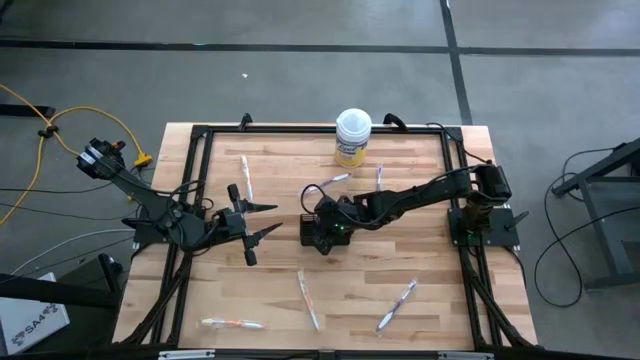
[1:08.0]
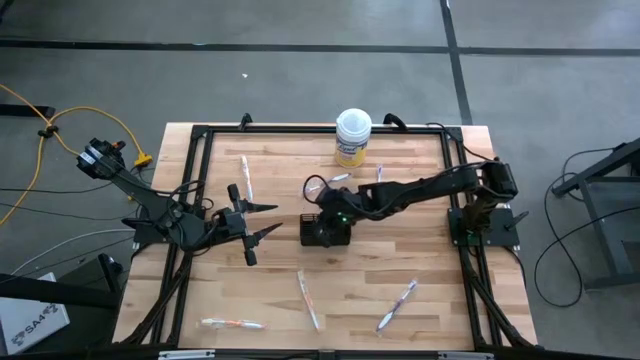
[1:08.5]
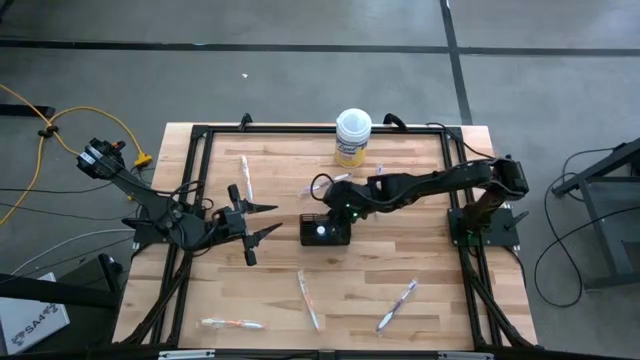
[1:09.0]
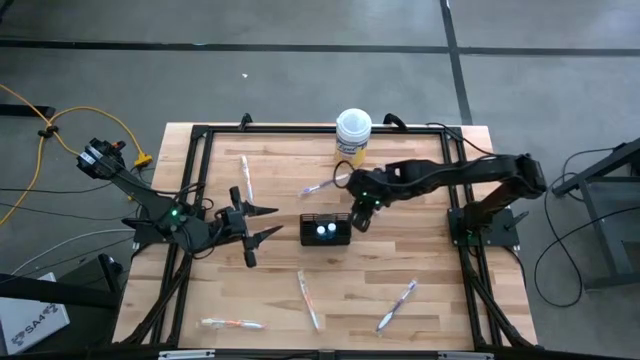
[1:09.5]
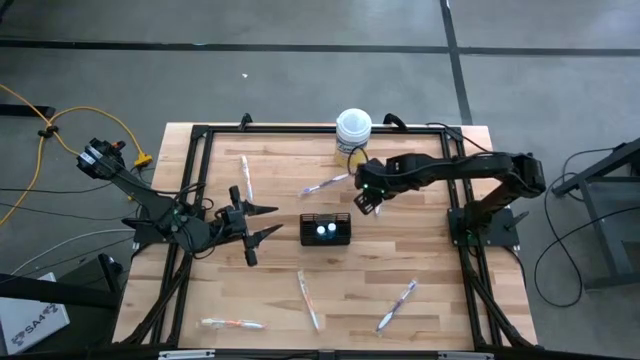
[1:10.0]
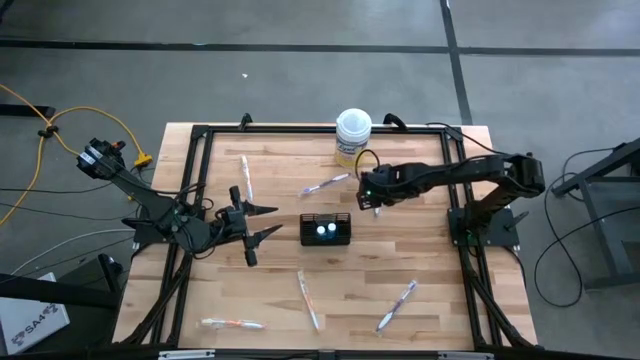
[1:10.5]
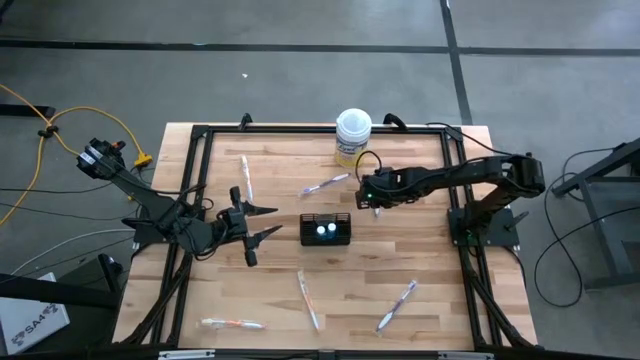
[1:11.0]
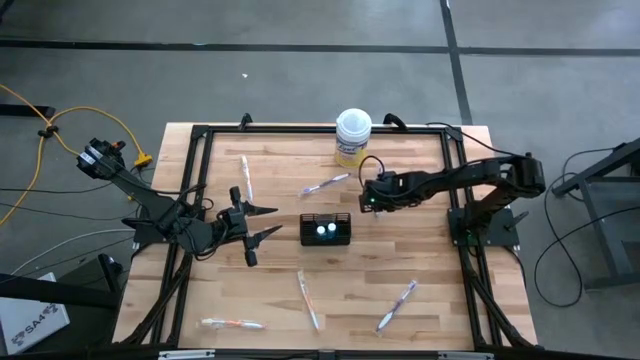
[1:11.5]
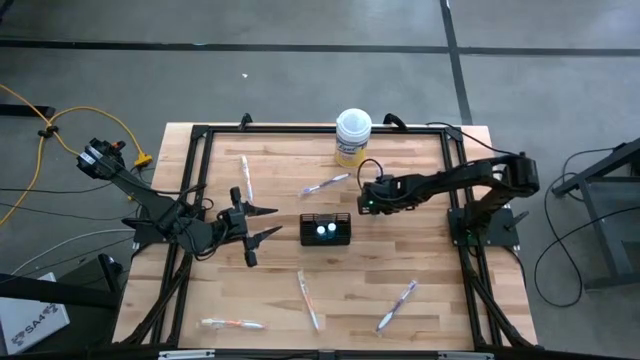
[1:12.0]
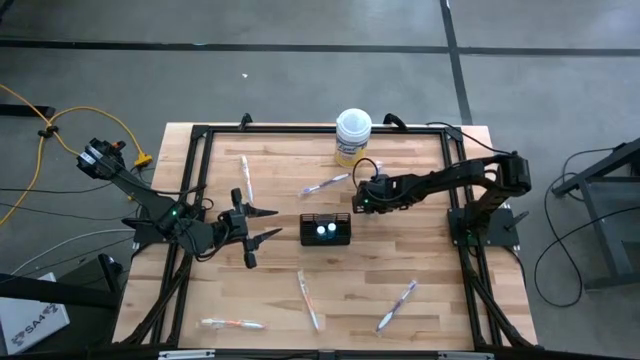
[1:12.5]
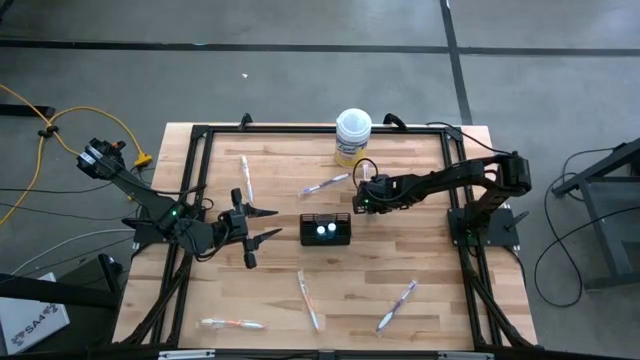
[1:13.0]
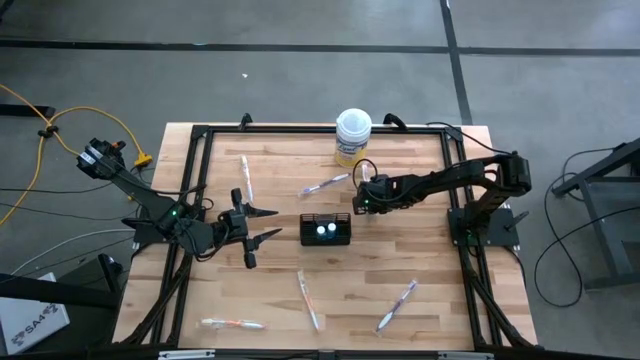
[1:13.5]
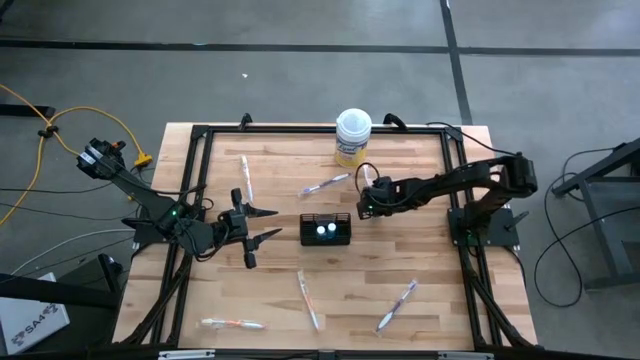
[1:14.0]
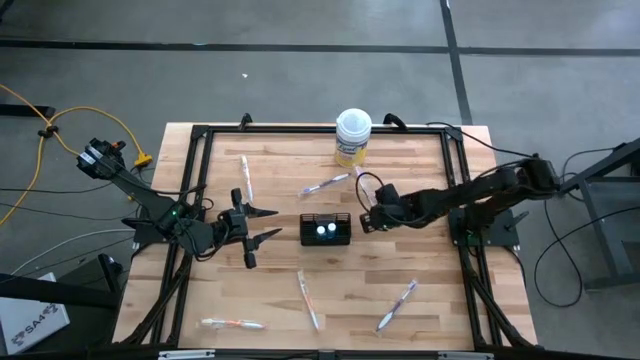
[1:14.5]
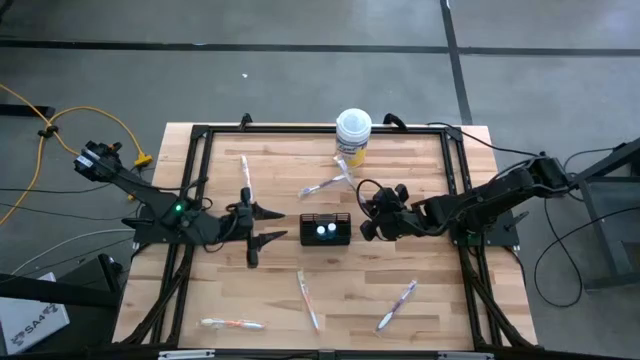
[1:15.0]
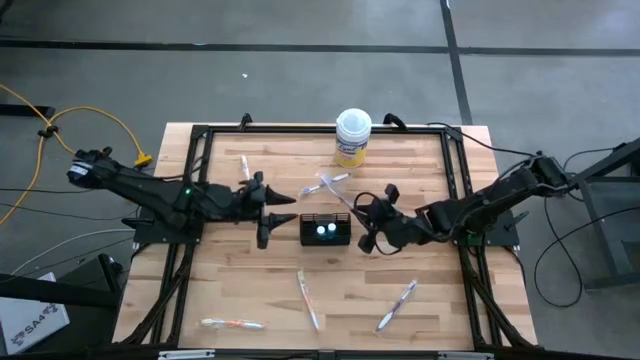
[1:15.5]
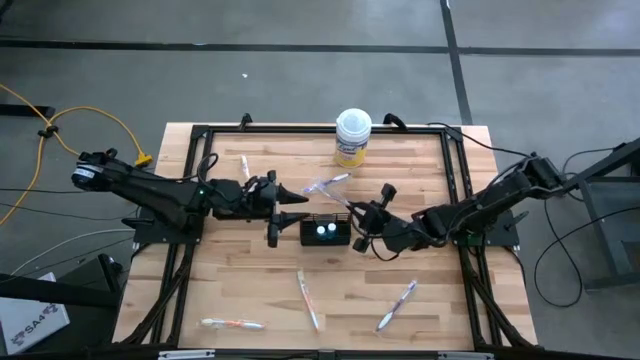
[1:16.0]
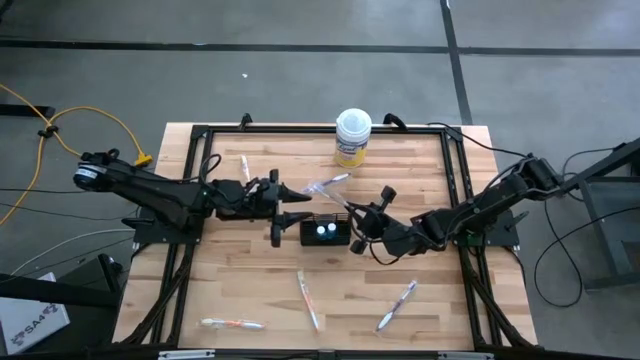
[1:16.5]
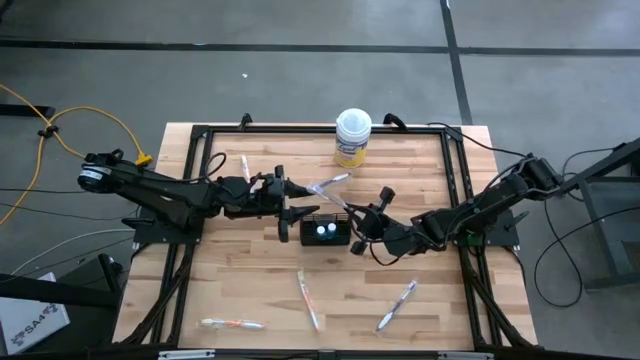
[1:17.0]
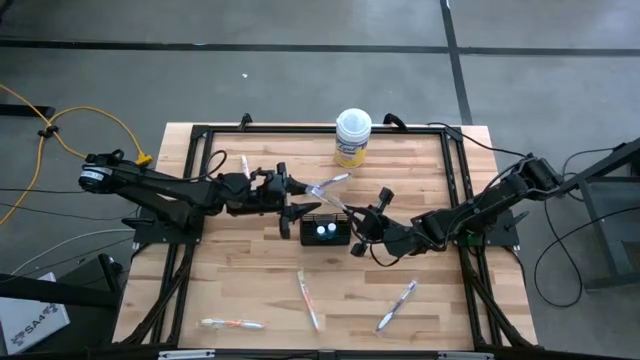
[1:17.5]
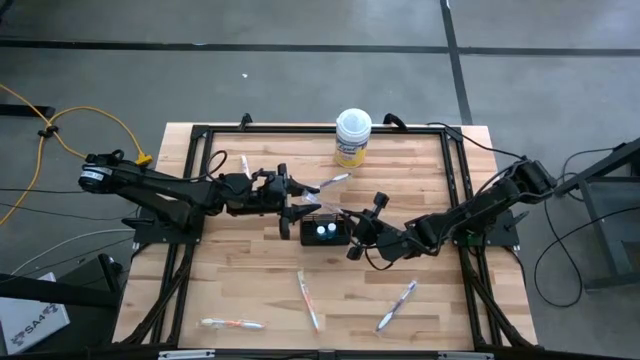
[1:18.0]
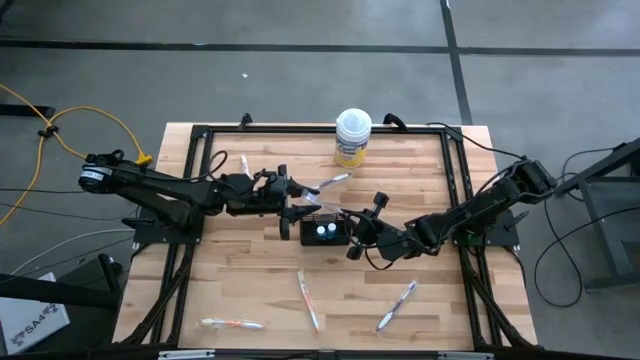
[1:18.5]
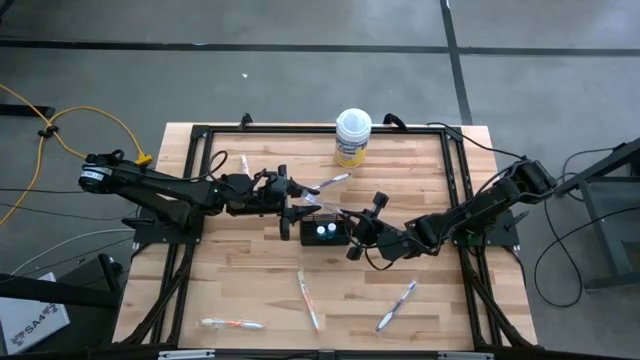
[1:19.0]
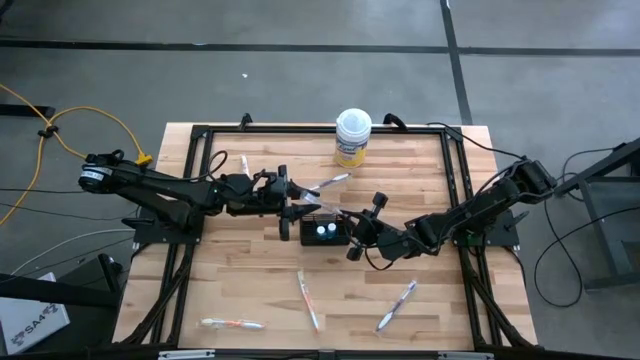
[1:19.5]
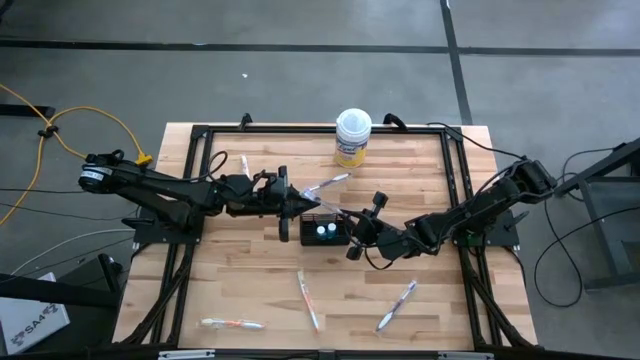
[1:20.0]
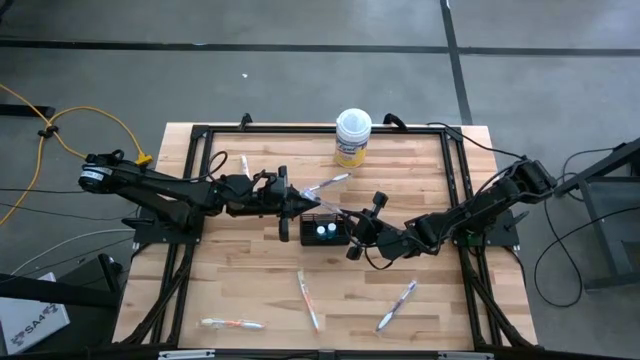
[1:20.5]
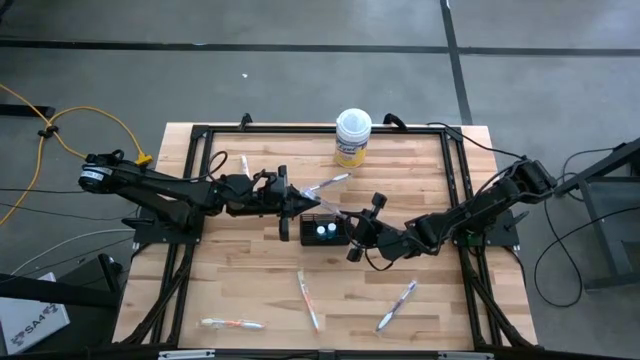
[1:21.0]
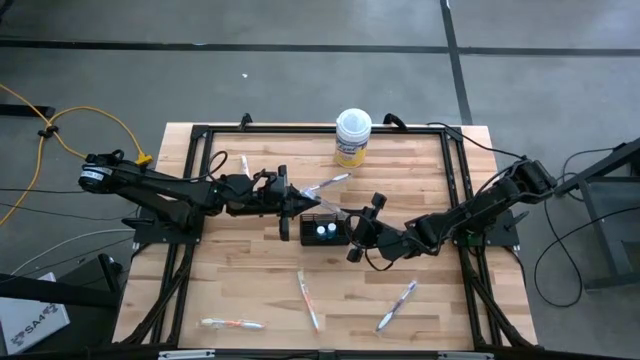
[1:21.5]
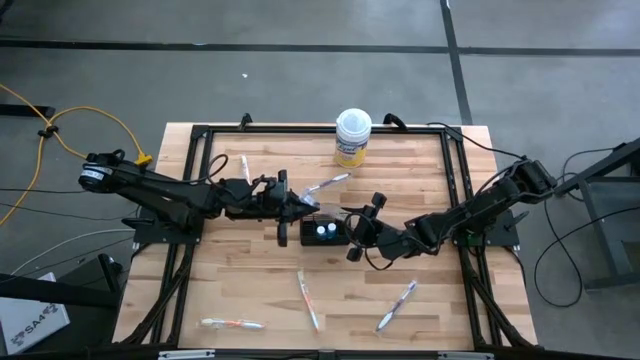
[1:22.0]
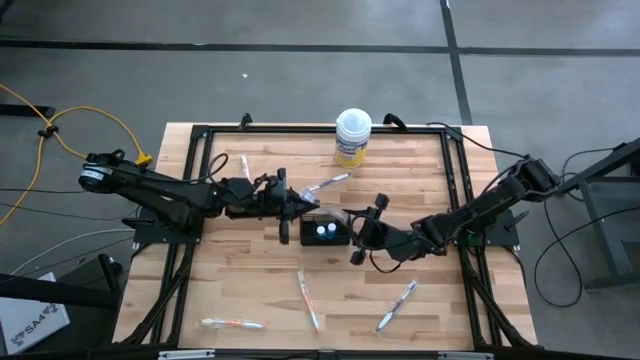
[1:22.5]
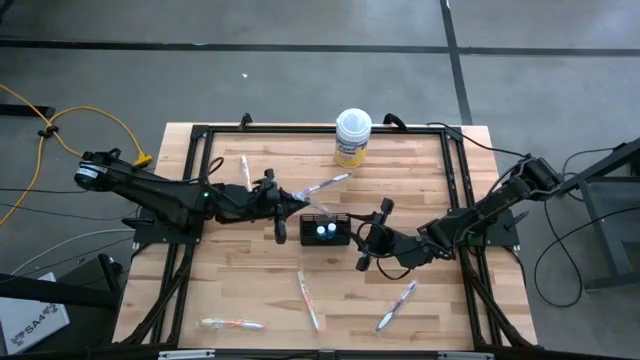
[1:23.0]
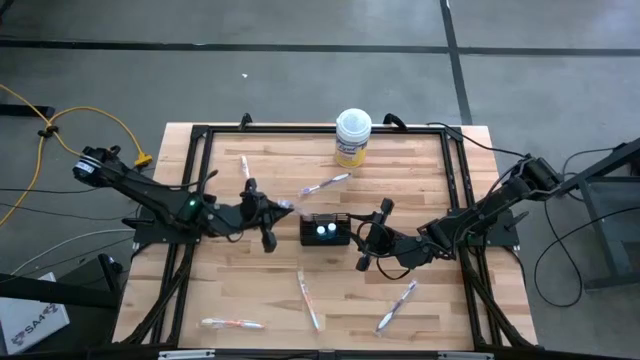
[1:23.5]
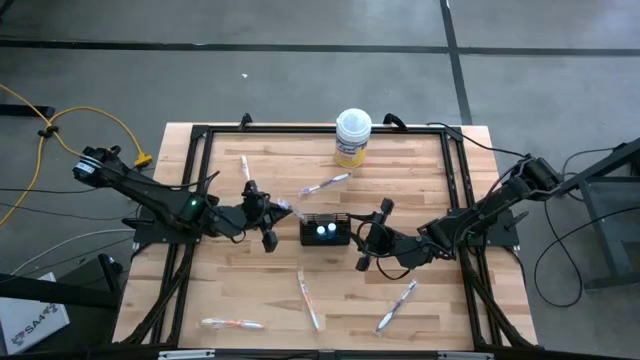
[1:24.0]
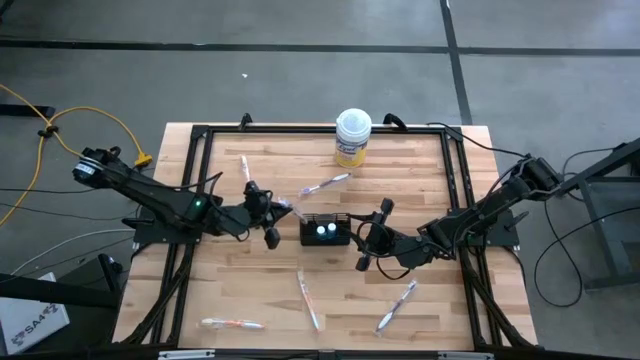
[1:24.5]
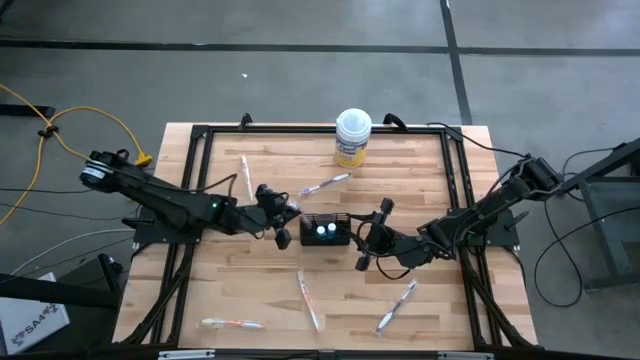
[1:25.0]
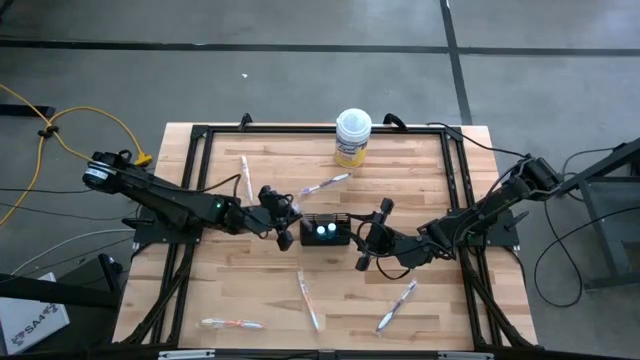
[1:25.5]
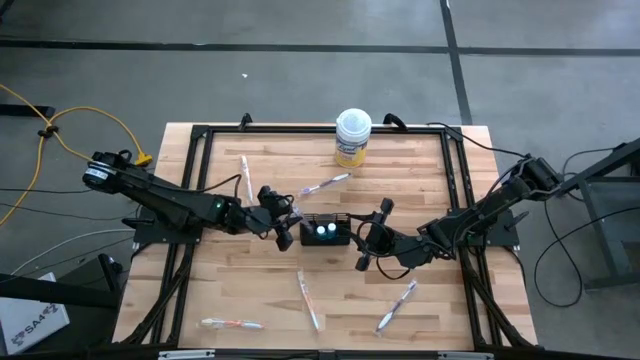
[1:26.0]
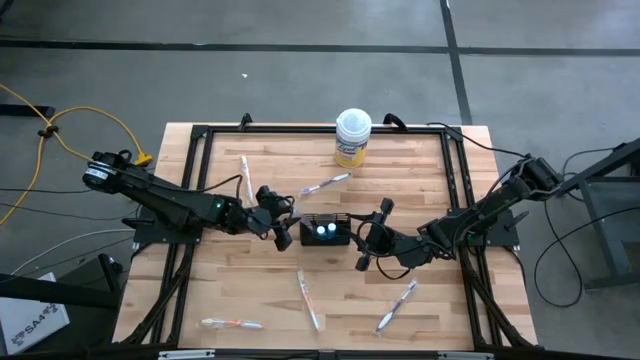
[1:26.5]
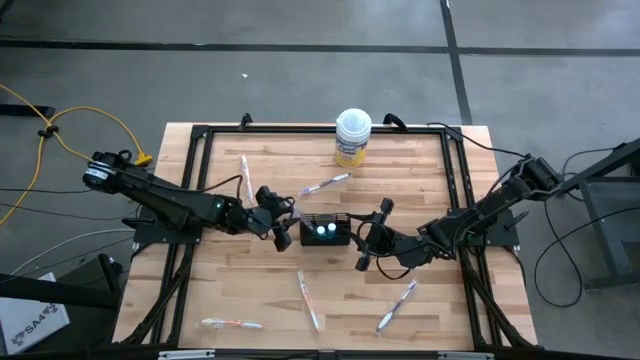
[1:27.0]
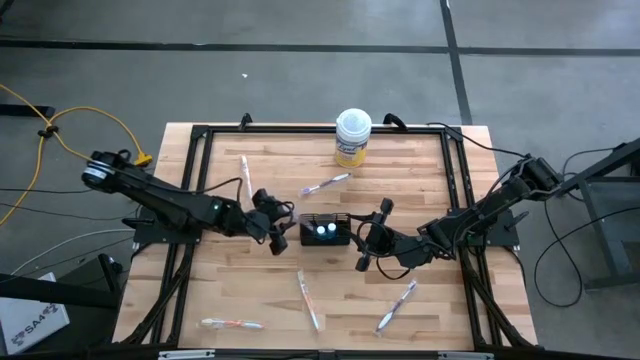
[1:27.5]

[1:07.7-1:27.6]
Task: Pick & Place toothbrushing station
Put the top right purple toothbrush into the wire organizer

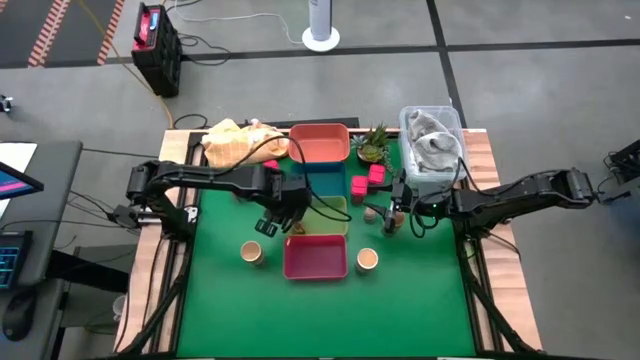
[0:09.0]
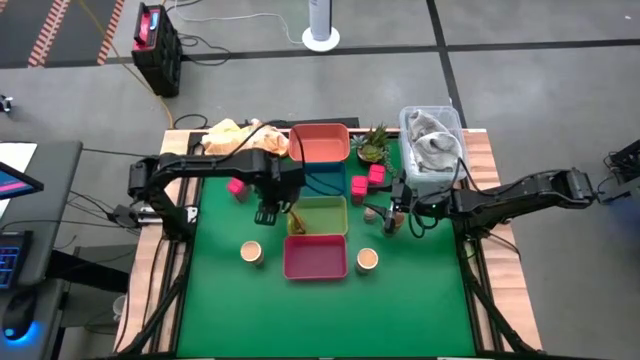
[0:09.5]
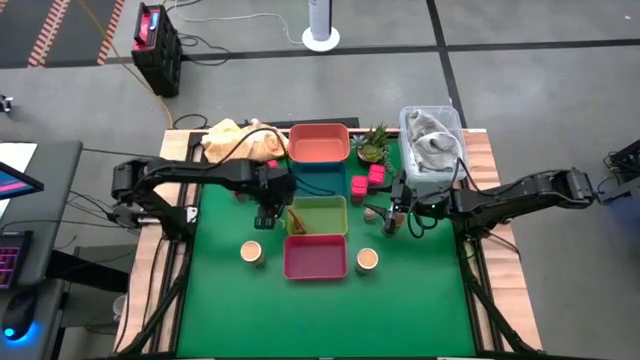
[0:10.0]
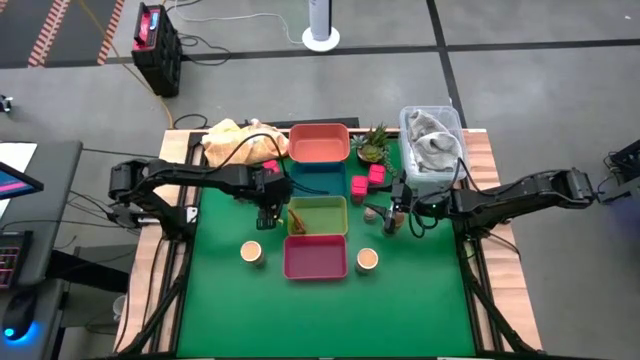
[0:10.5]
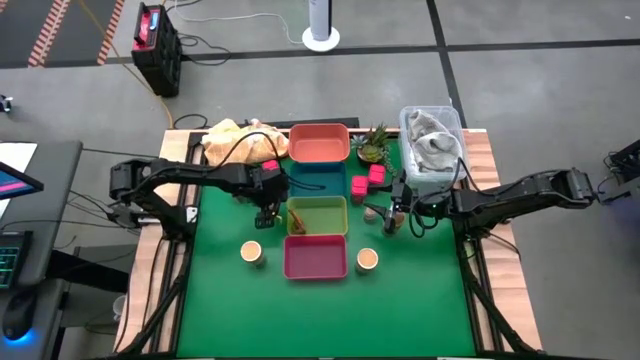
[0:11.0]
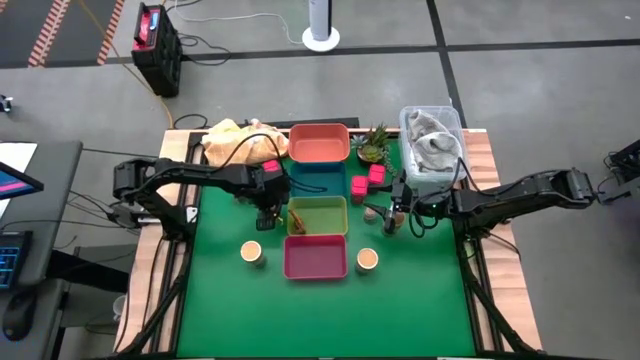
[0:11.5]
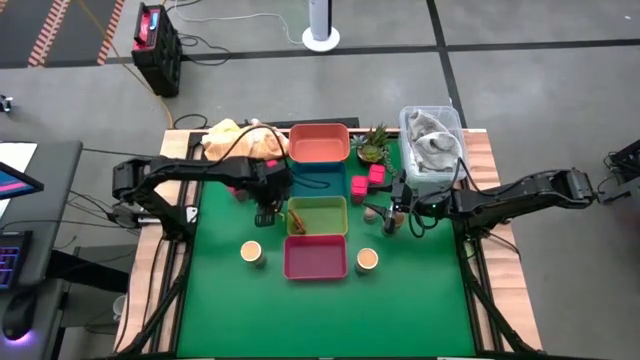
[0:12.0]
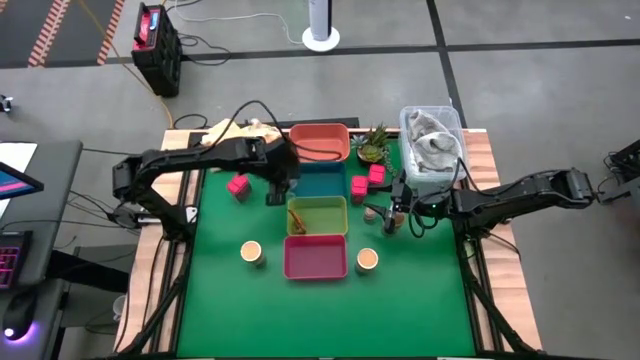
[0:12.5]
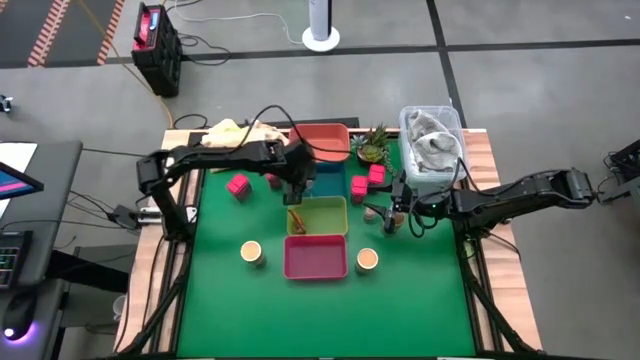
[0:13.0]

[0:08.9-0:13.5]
Task: Sort spices by type
Put the brown seasoning bottle into the blue bin
